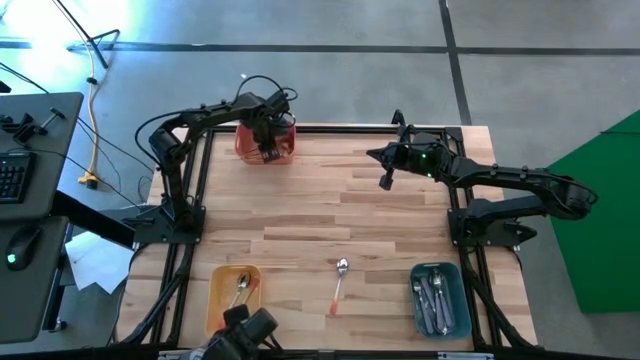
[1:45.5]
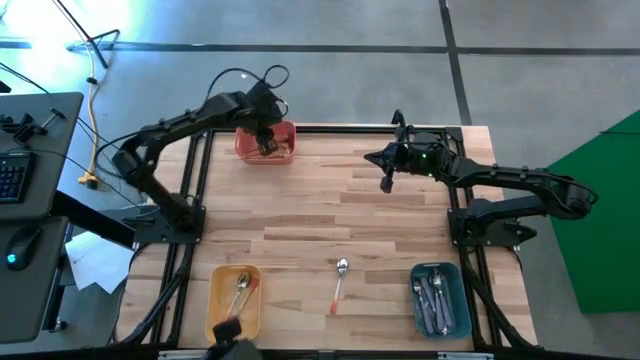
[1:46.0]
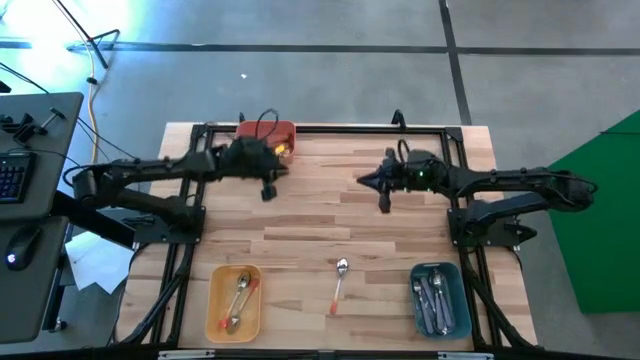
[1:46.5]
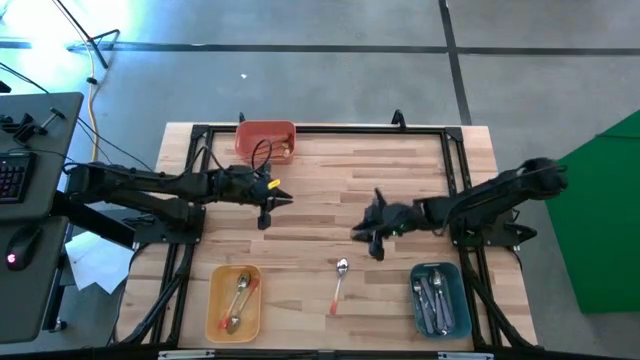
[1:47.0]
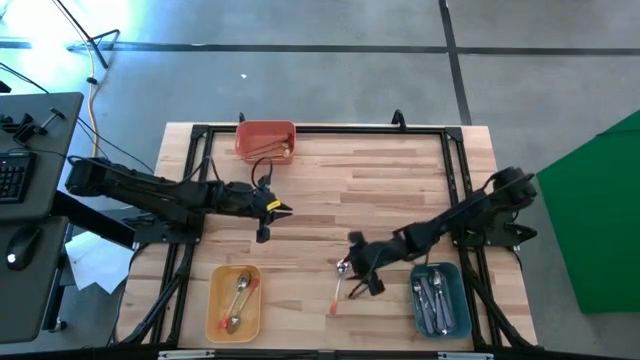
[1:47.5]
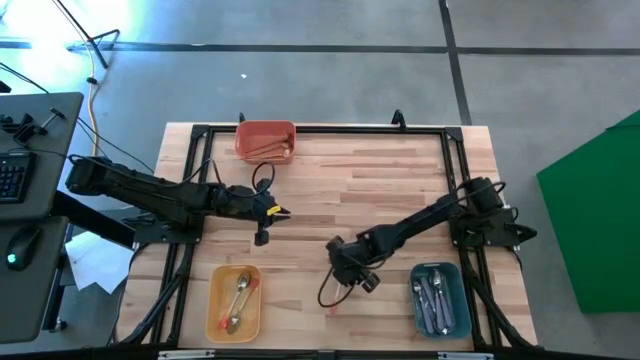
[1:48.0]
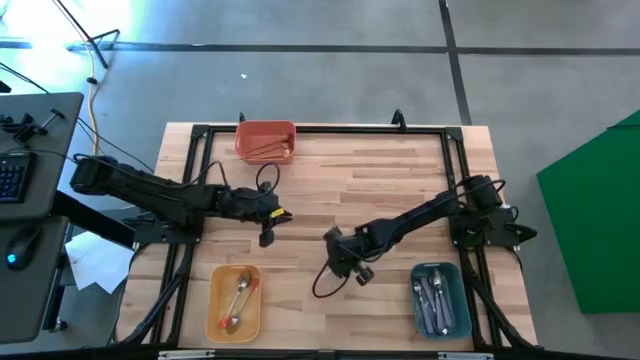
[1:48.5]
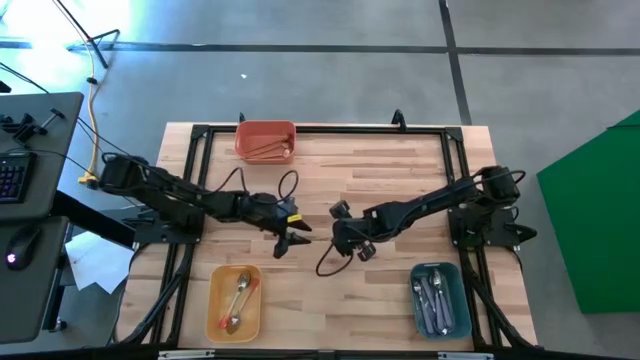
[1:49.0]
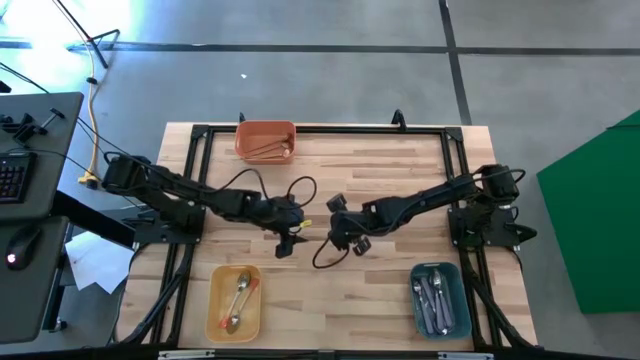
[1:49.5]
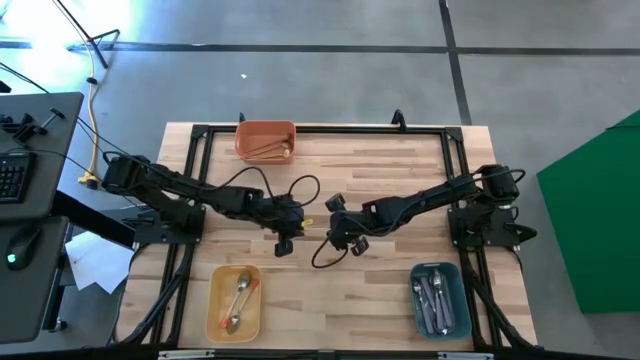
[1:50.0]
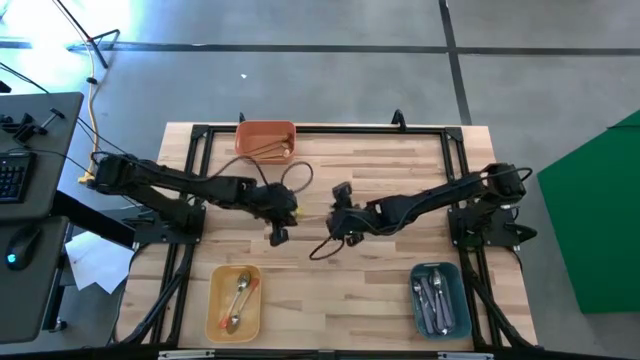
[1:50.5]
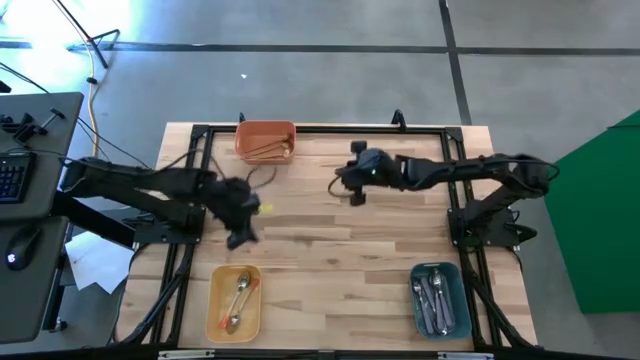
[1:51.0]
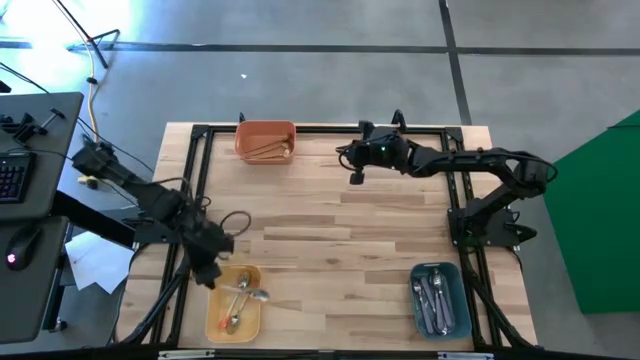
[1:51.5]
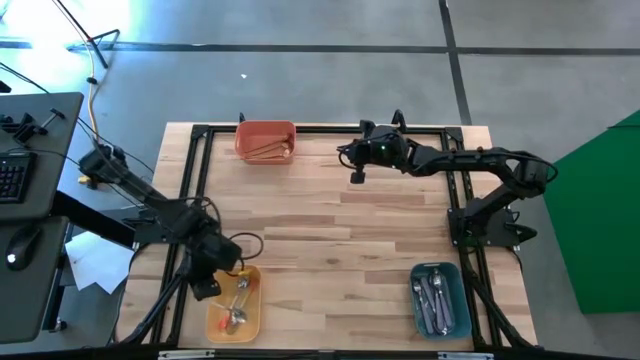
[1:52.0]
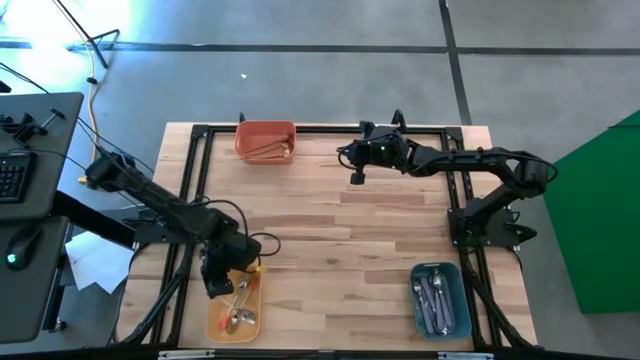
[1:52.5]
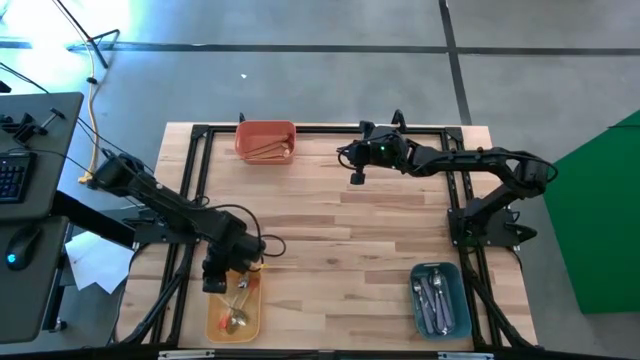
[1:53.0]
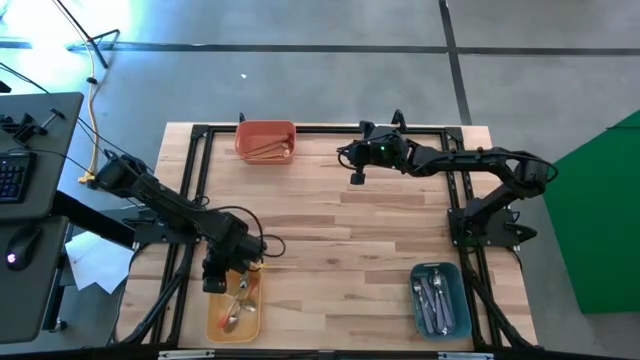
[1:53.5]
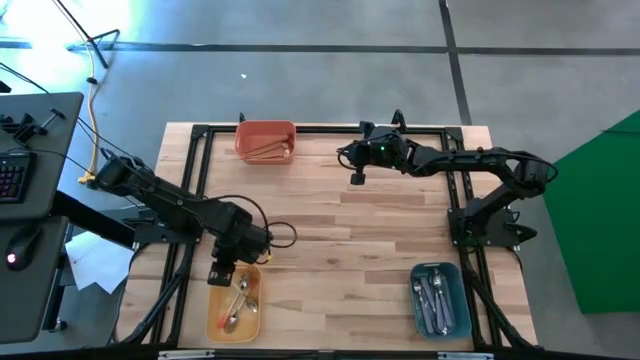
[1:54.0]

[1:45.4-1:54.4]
Task: Sort silverware by color (type)
Put the orange spoon into the yellow bin

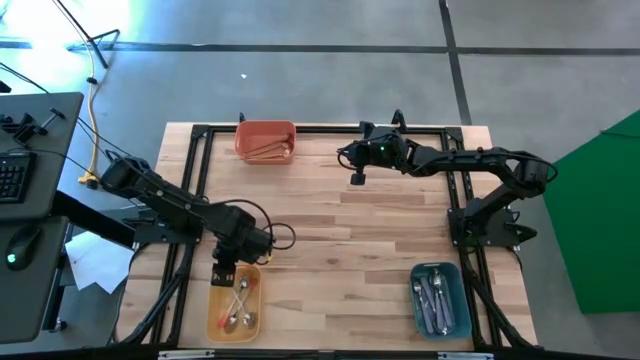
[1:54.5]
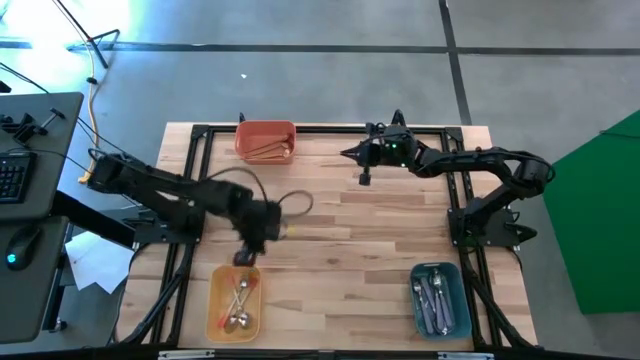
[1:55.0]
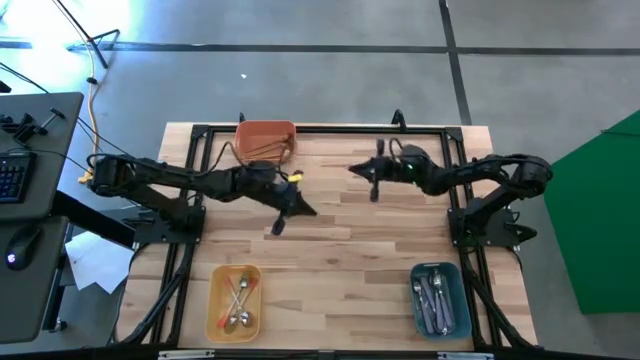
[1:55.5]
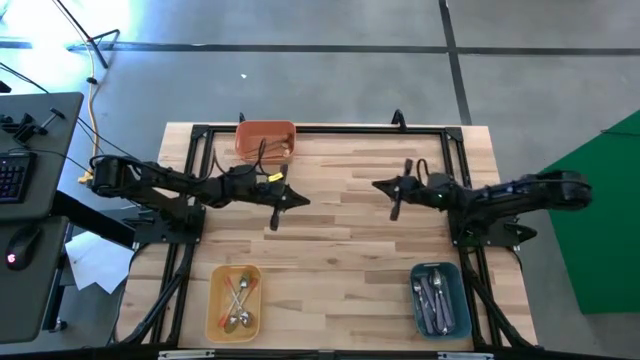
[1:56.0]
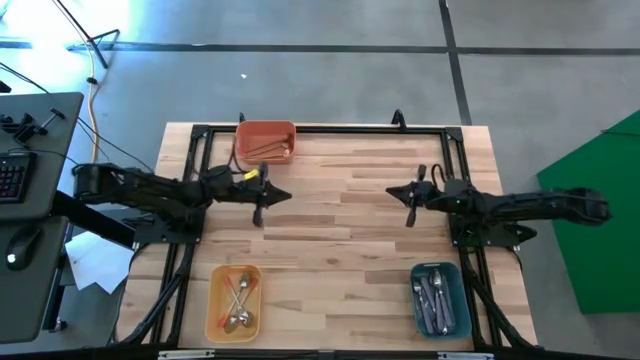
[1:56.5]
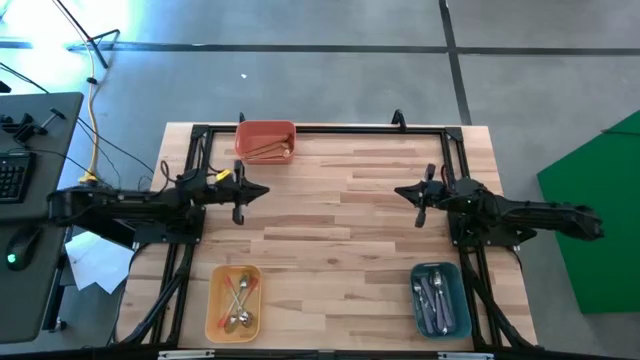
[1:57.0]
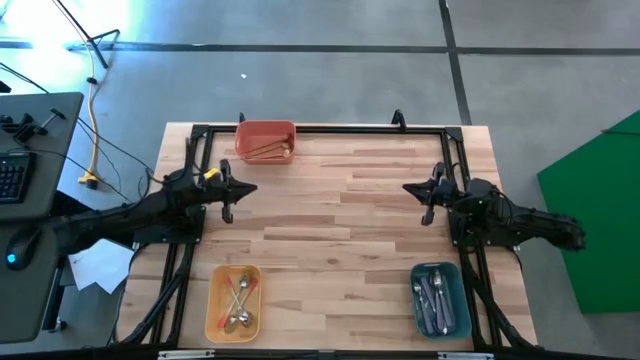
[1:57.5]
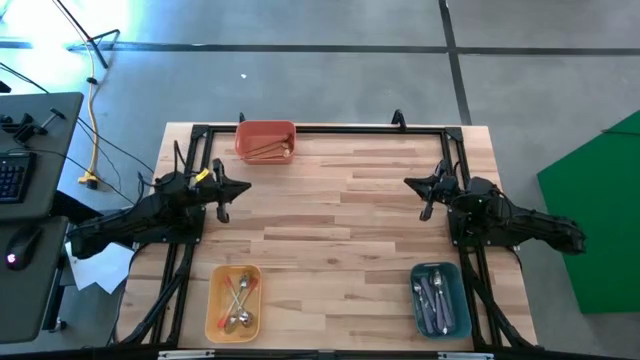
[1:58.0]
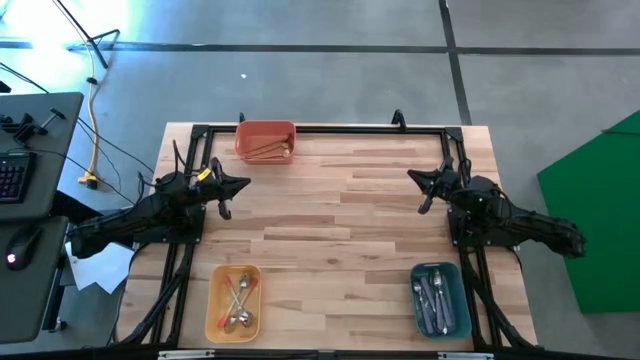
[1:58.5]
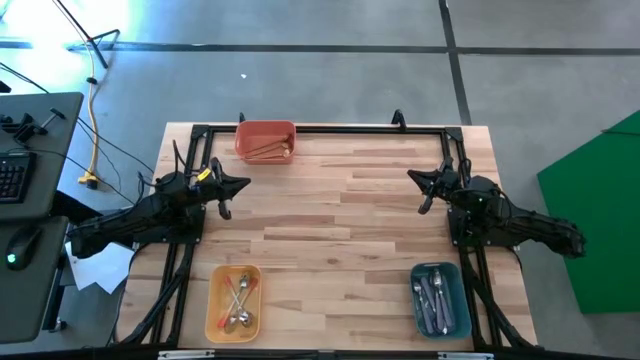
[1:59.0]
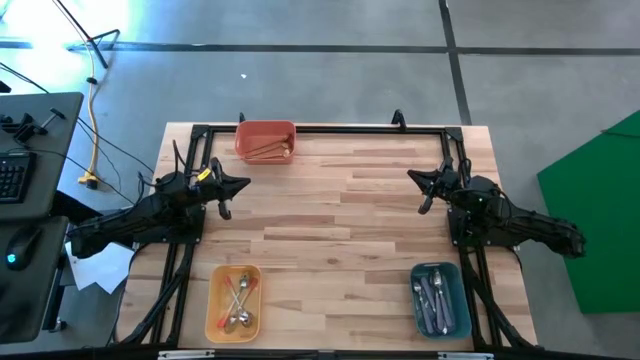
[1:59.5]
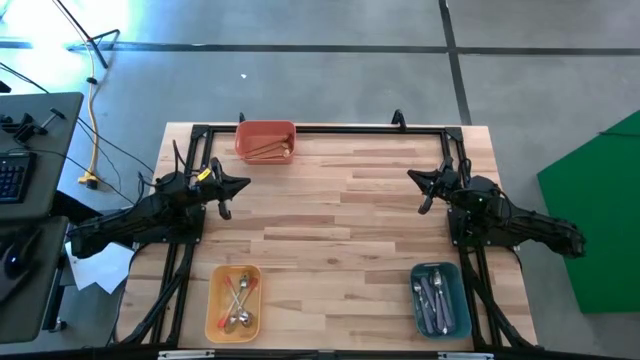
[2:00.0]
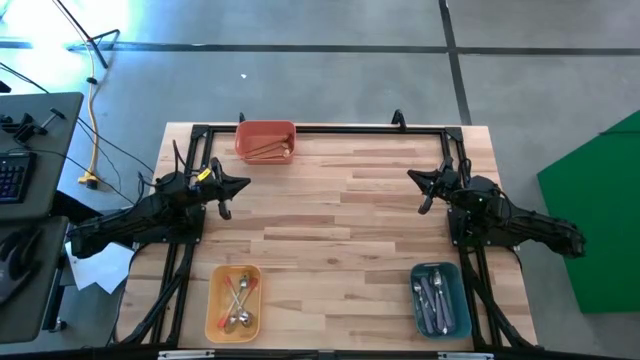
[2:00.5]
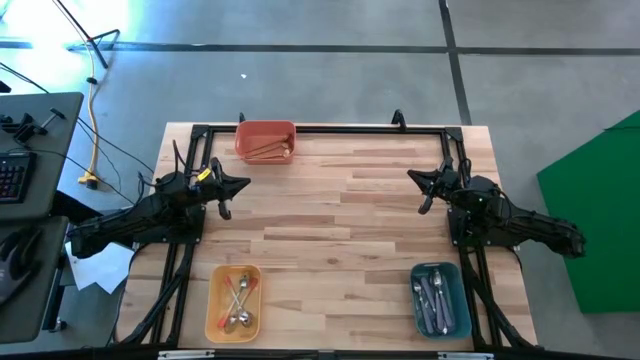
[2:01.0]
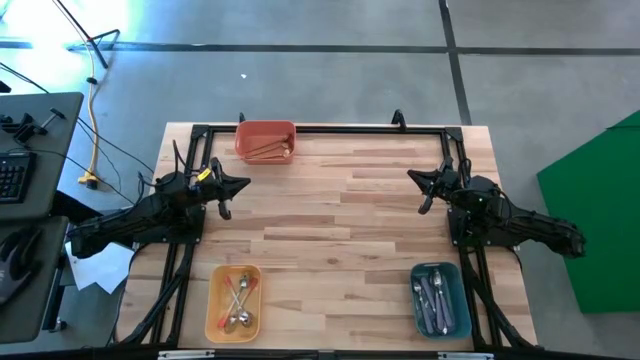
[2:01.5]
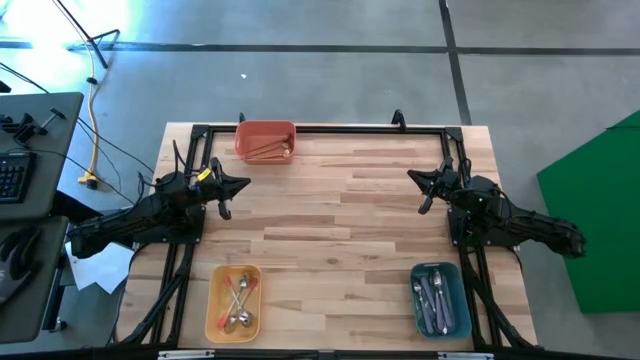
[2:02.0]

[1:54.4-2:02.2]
Return to Home Position

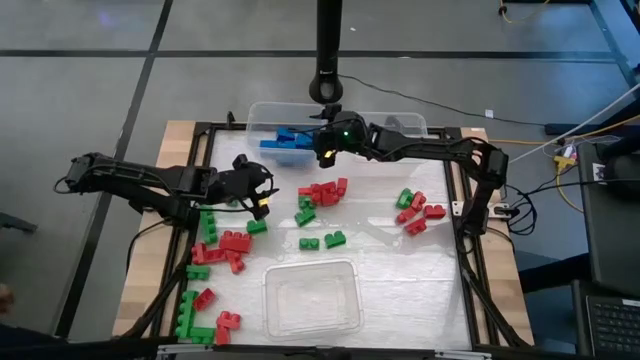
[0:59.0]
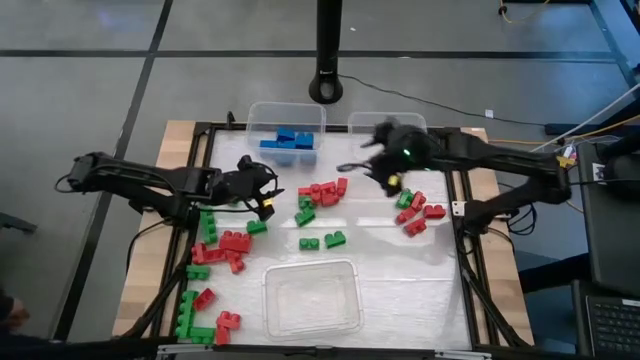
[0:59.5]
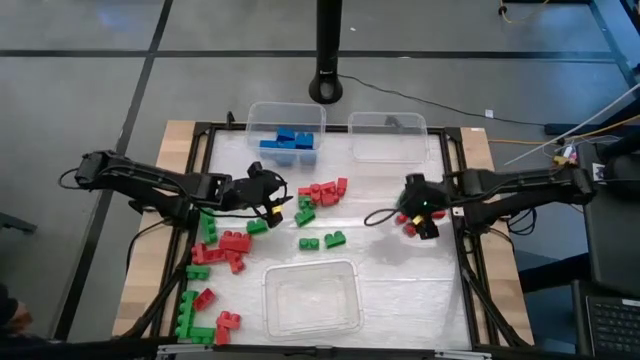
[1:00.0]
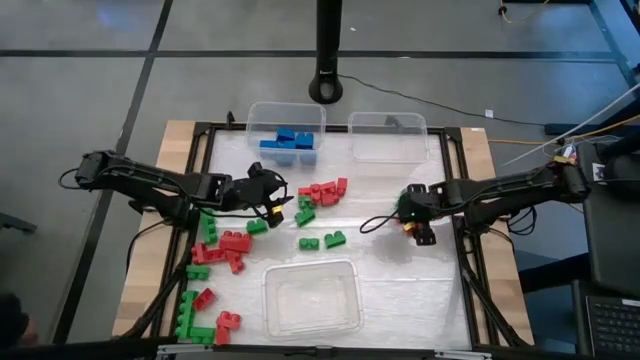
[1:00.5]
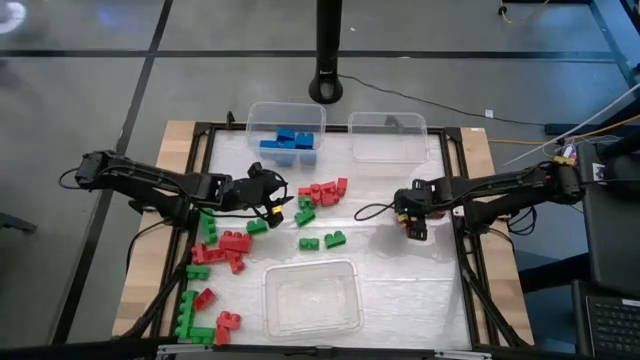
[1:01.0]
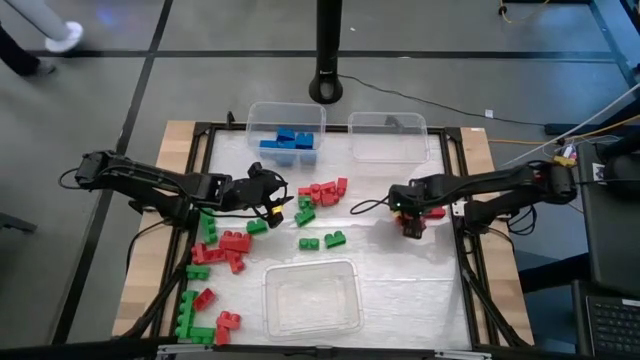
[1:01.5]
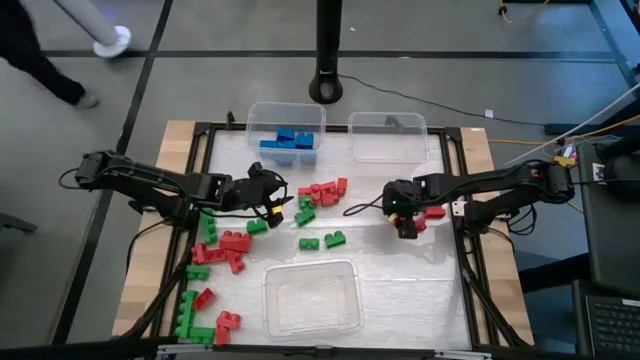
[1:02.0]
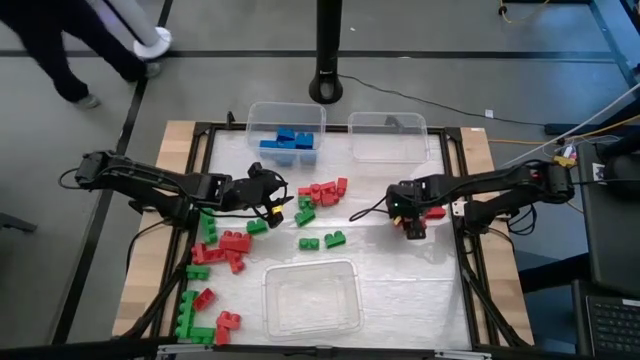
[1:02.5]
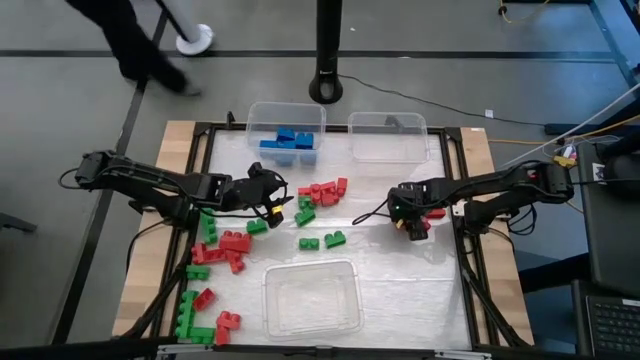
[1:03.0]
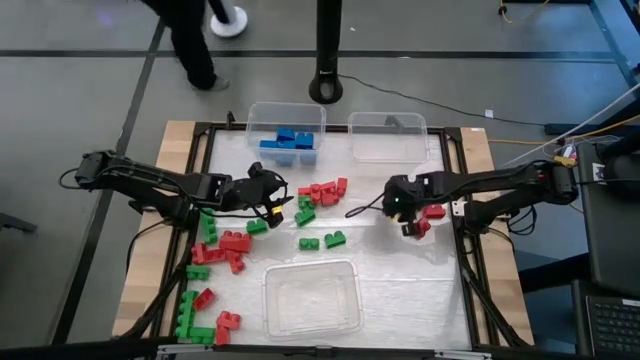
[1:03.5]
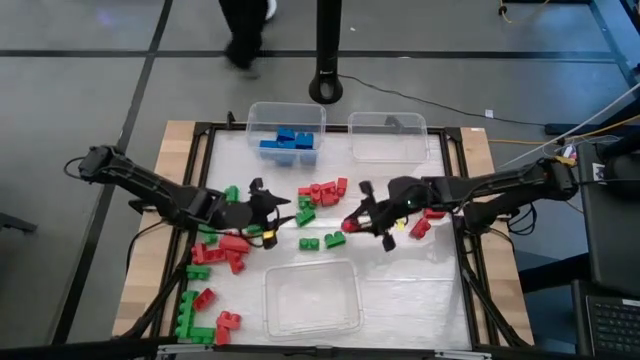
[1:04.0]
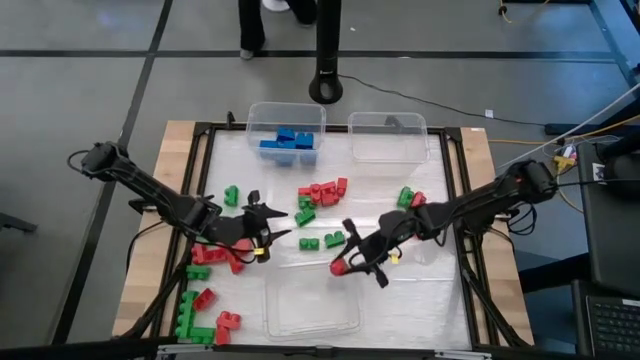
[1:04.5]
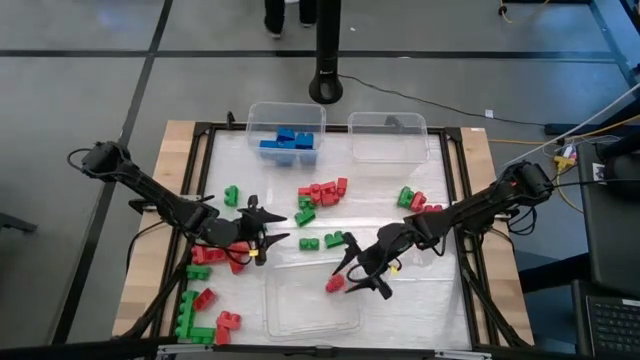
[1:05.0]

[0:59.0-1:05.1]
Task: Sort blocks
Put the red game piece into the bottom transparent bin
